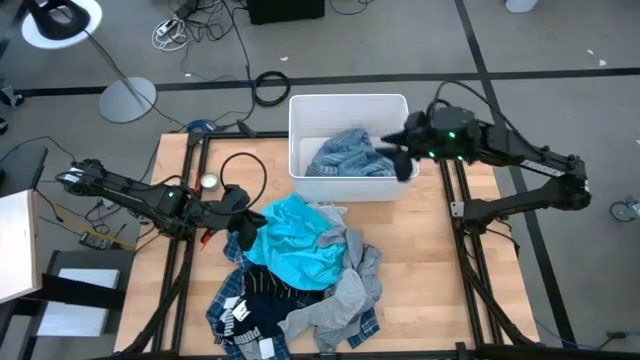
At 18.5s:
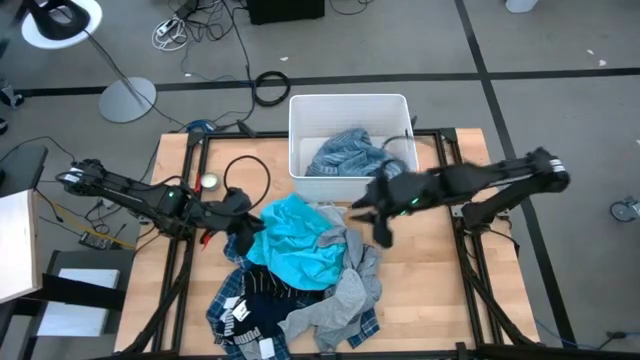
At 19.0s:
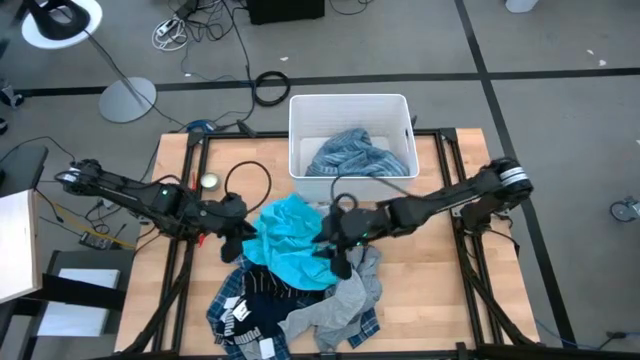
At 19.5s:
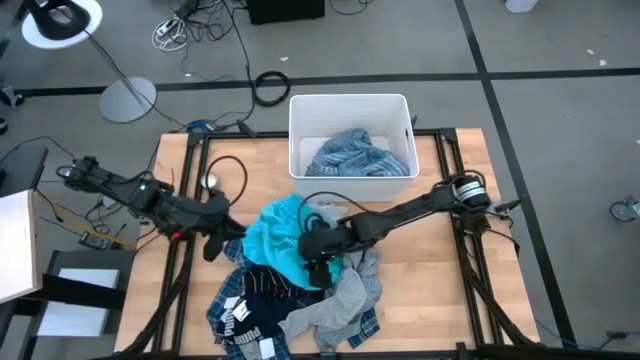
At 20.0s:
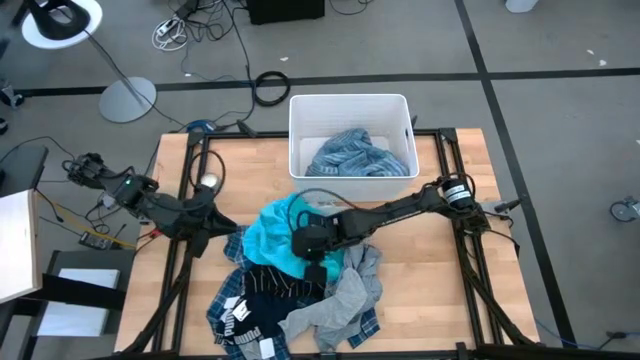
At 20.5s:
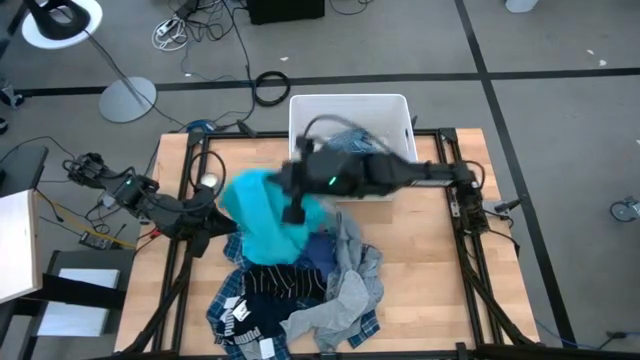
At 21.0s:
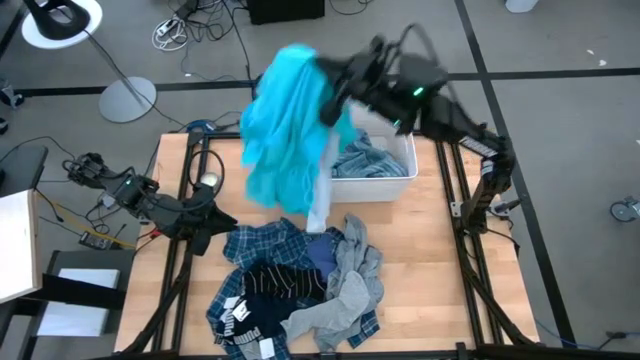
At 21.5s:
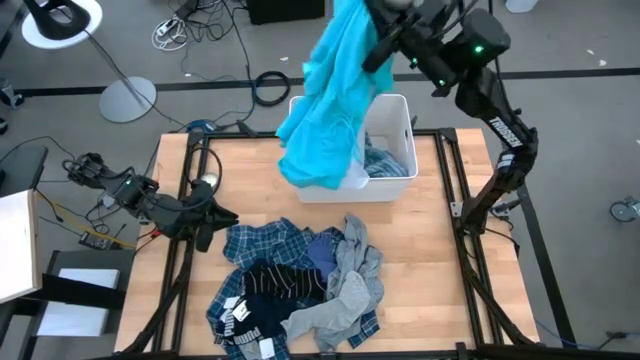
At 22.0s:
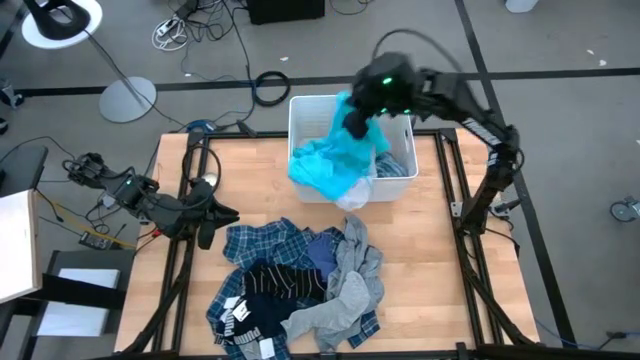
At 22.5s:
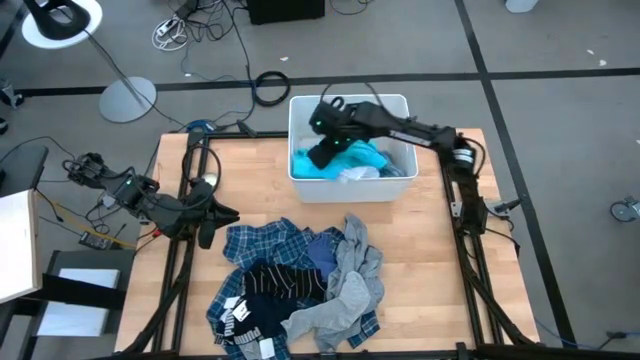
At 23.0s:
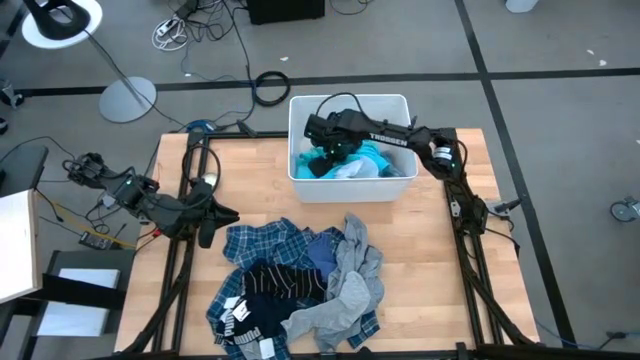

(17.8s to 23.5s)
Task: Sort clothes
Put the light blue shorts into the white laundry bin

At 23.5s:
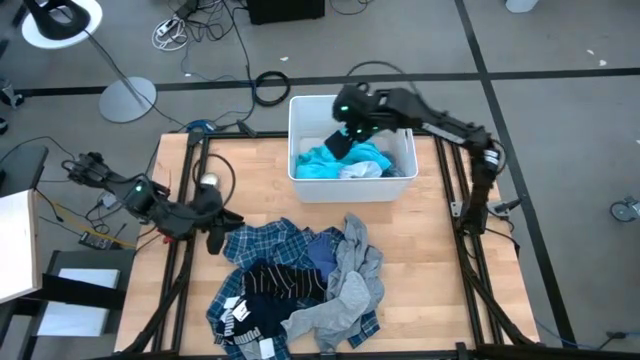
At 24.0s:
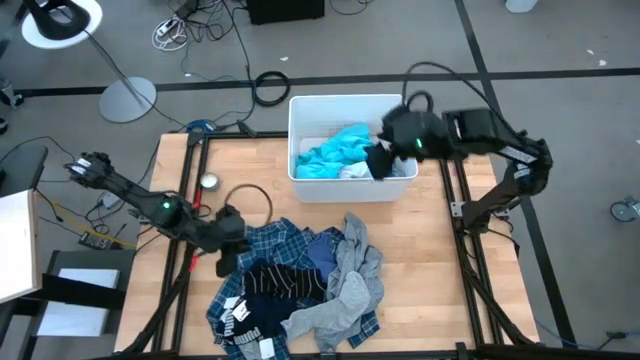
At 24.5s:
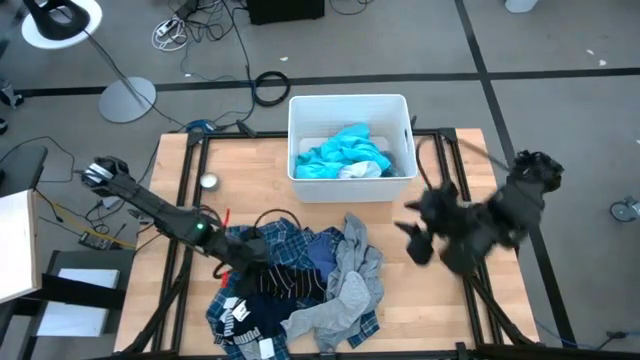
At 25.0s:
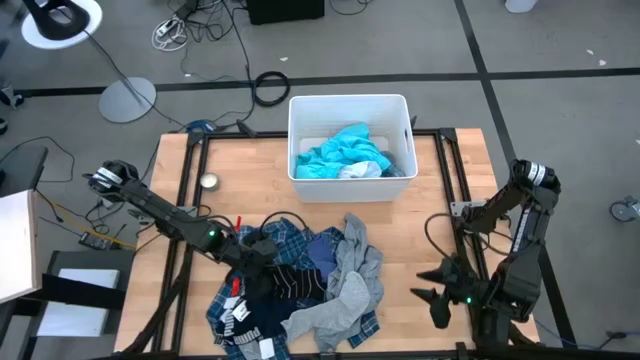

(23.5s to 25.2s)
Put the black sock into the white laundry bin

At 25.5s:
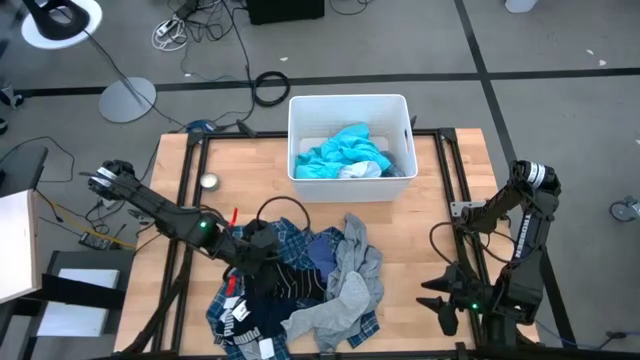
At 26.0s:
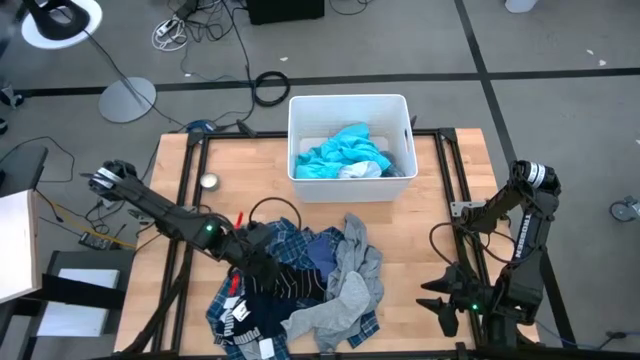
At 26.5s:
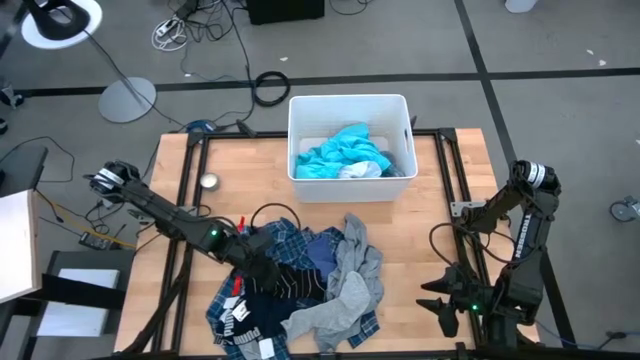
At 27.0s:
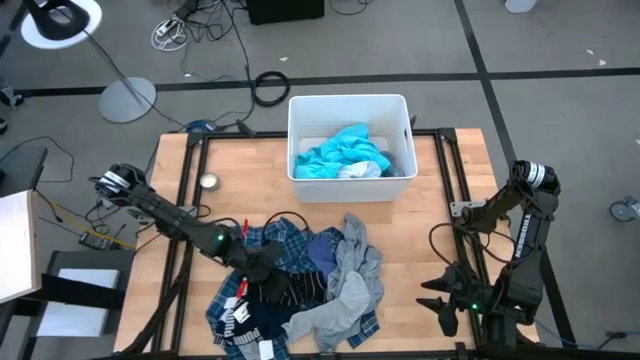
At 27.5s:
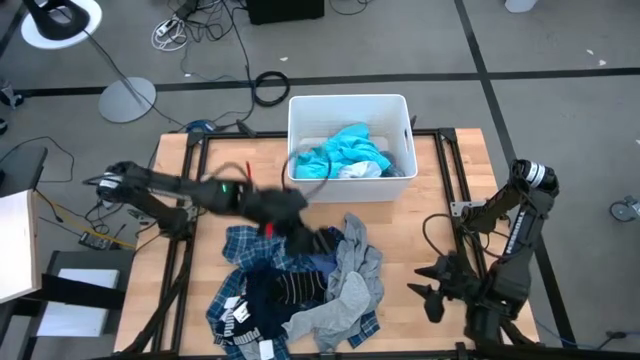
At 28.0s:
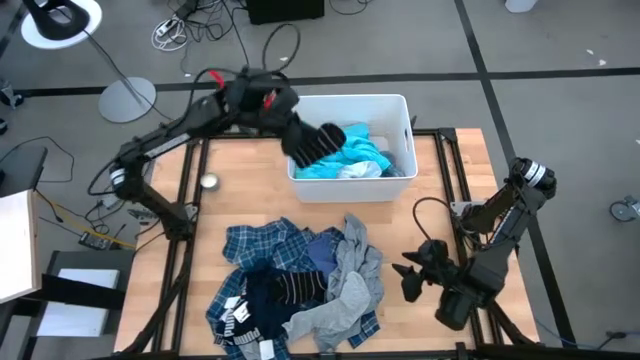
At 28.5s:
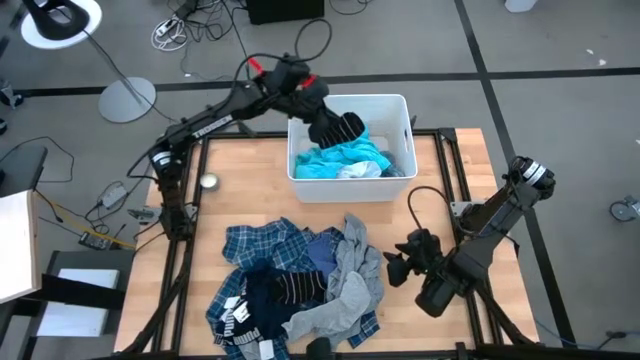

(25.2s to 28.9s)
Put the black sock into the white laundry bin

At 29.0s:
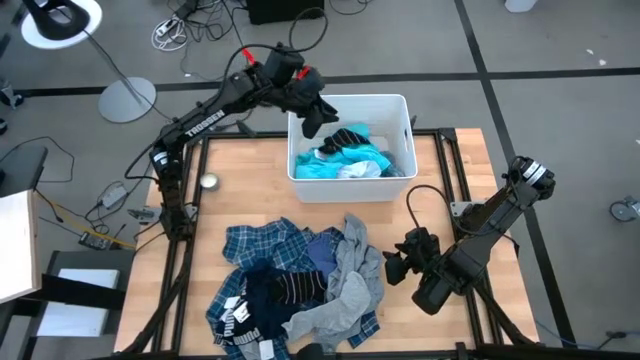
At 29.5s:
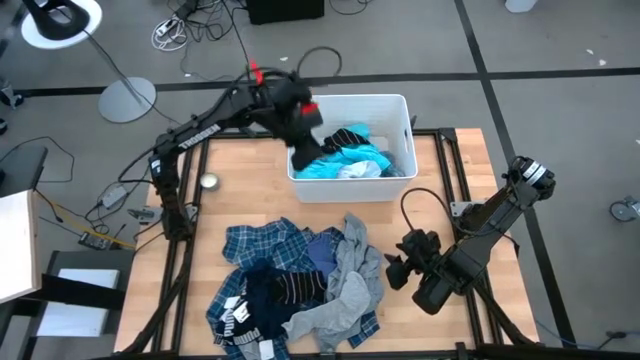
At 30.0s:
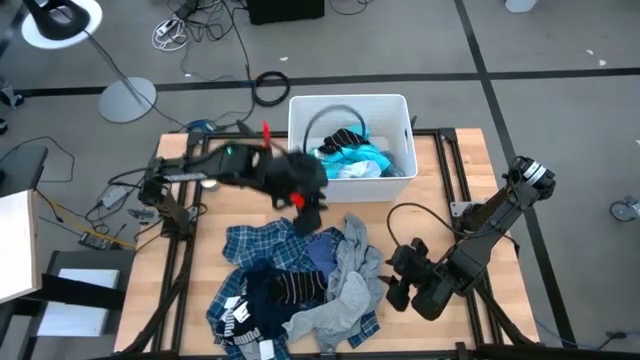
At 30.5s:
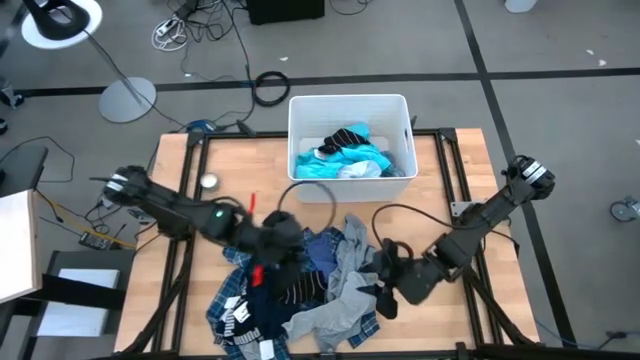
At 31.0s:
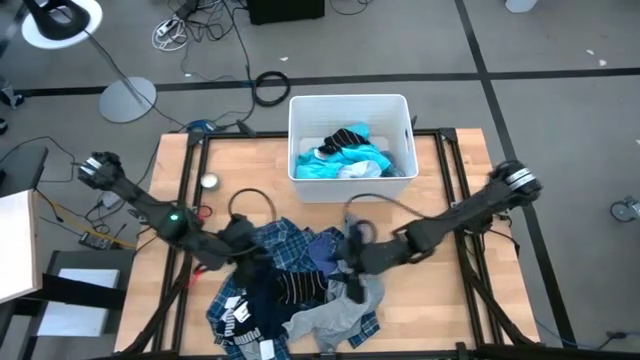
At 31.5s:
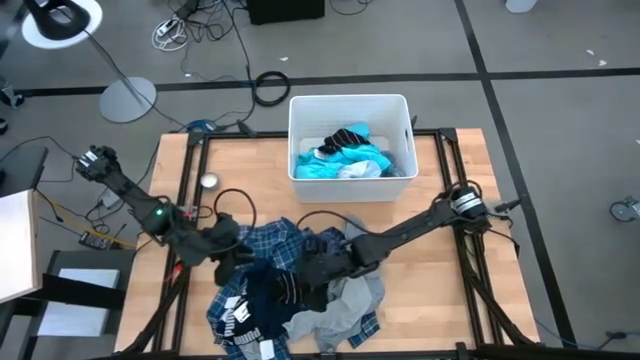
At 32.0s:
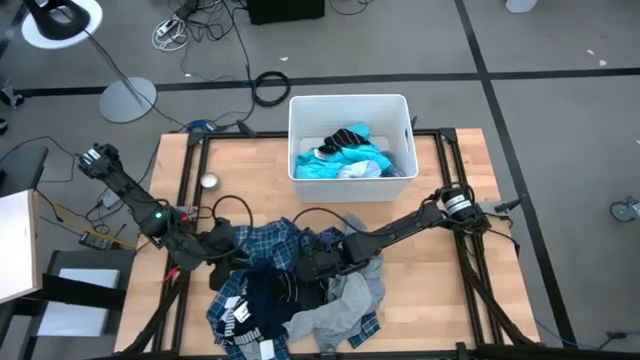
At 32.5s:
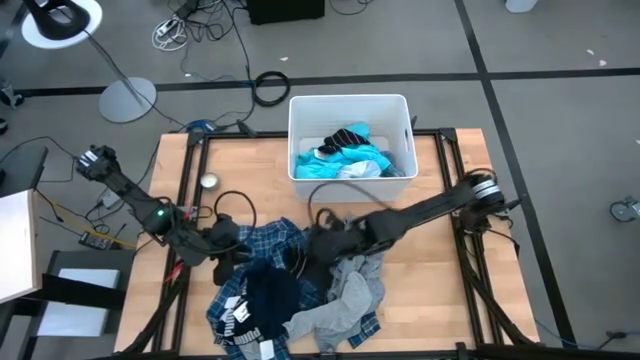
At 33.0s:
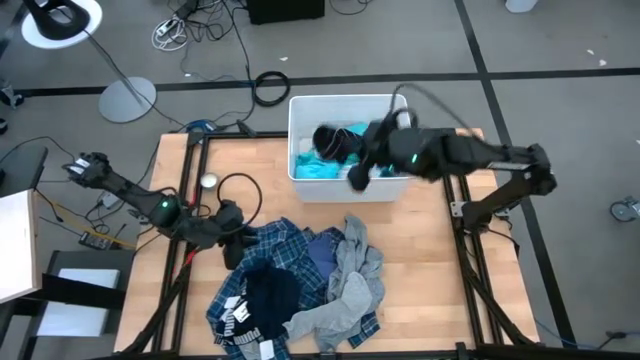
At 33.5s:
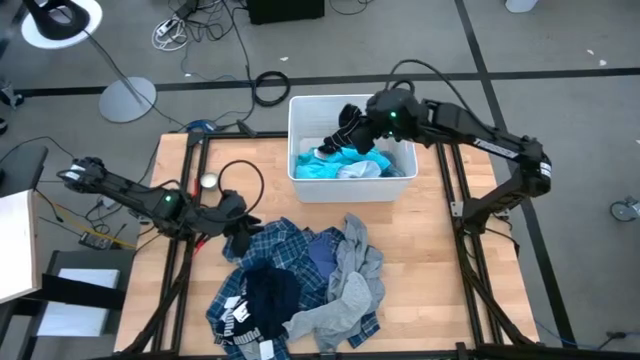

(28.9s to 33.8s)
Put the black sock into the white laundry bin

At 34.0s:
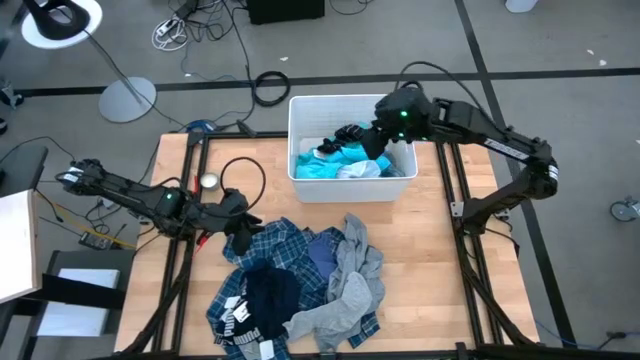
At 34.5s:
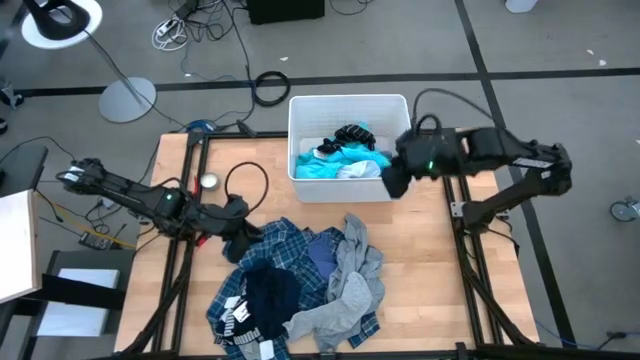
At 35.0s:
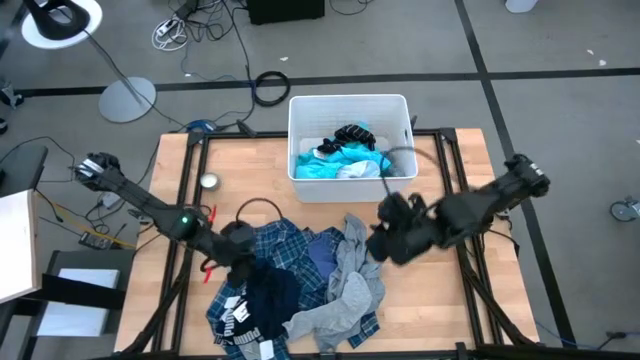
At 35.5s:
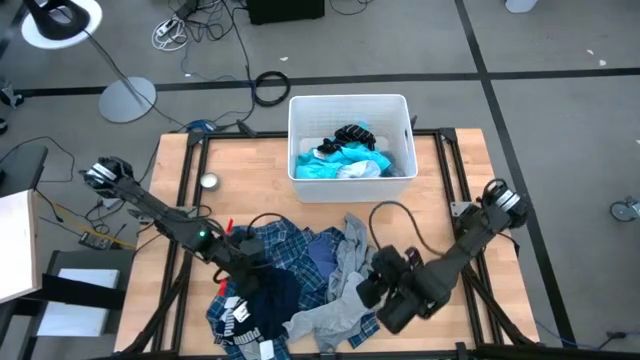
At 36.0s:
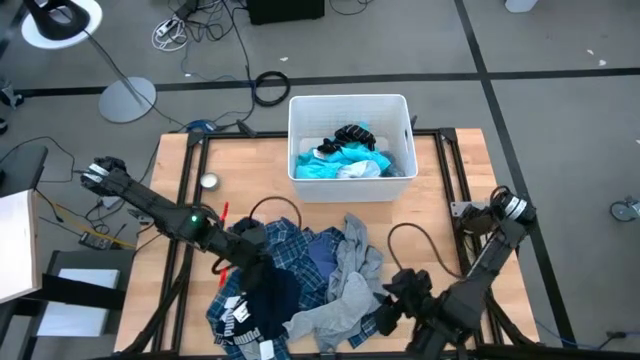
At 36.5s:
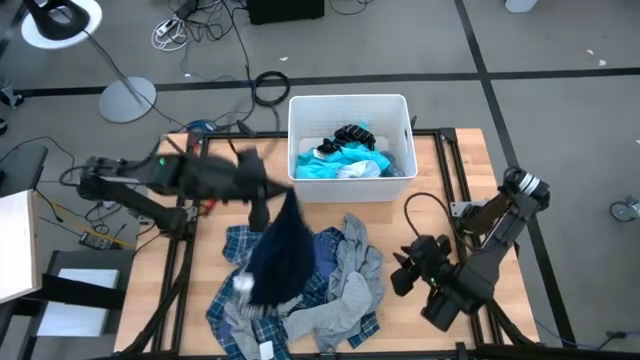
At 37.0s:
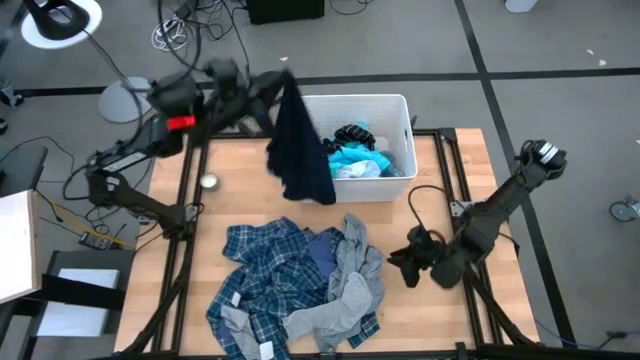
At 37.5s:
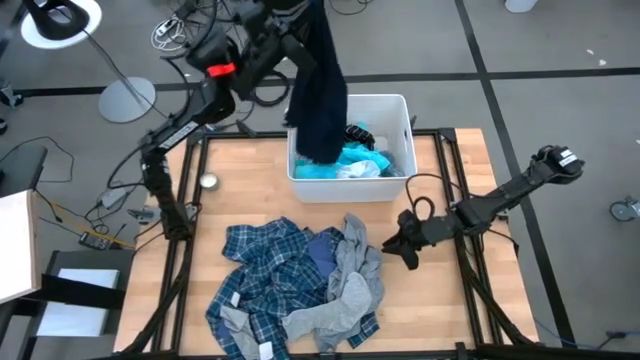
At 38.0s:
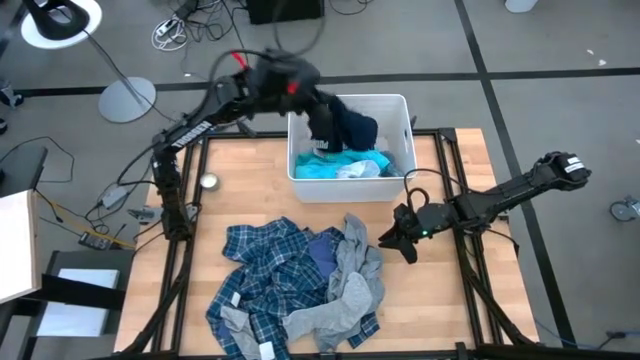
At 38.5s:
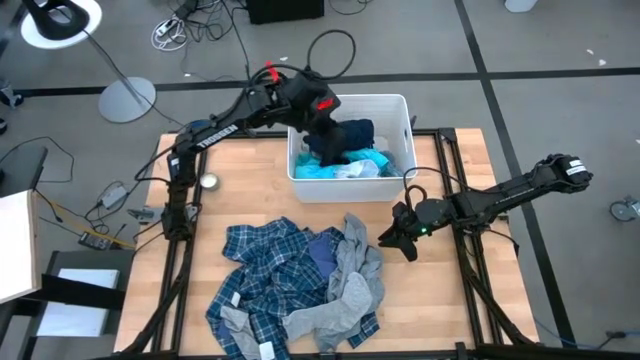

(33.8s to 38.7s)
Put the dark blue boxer shorts into the white laundry bin
